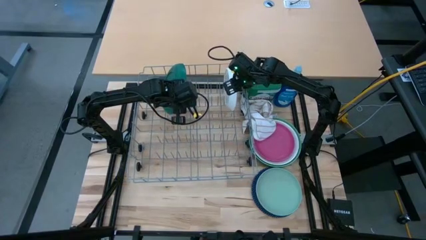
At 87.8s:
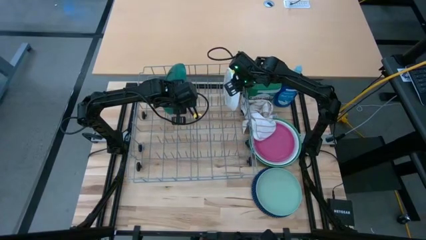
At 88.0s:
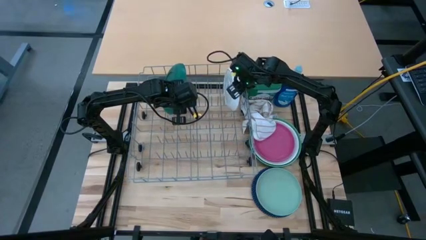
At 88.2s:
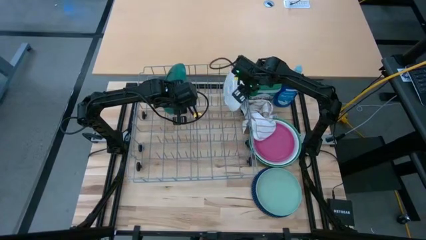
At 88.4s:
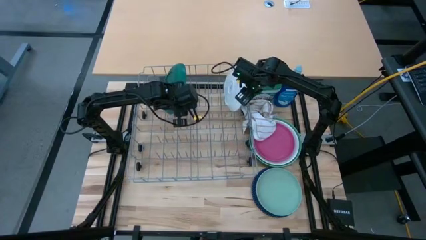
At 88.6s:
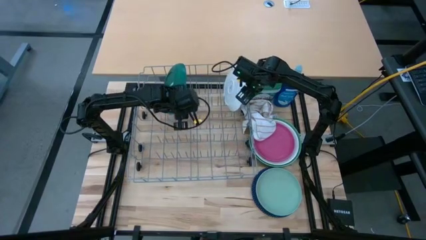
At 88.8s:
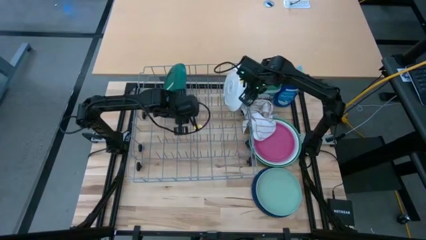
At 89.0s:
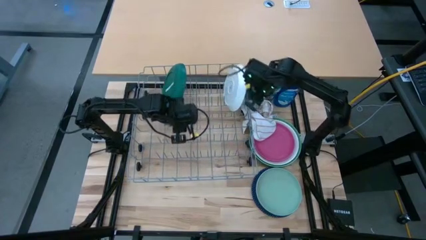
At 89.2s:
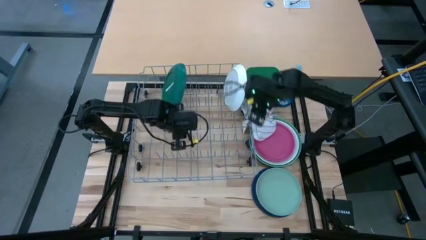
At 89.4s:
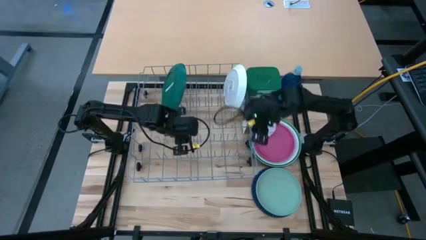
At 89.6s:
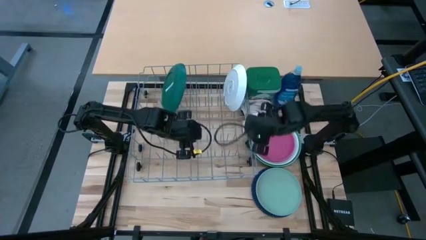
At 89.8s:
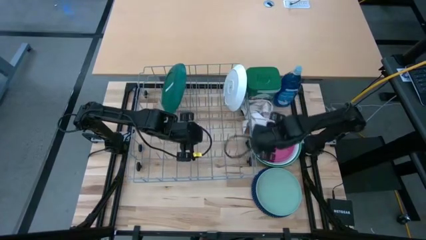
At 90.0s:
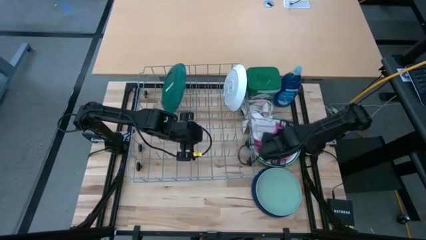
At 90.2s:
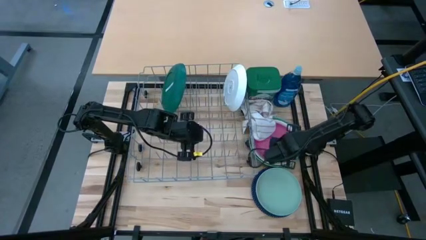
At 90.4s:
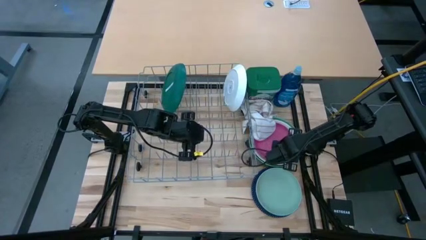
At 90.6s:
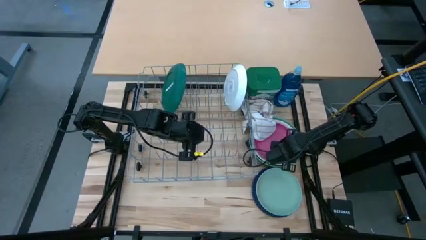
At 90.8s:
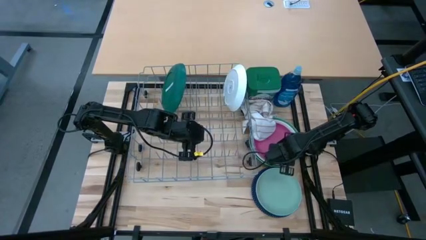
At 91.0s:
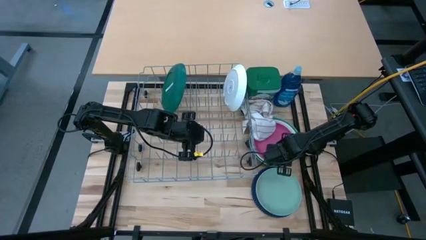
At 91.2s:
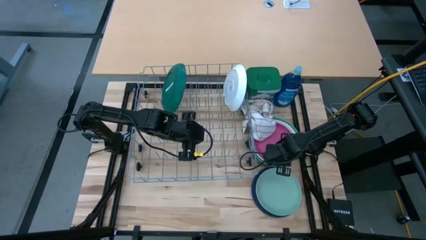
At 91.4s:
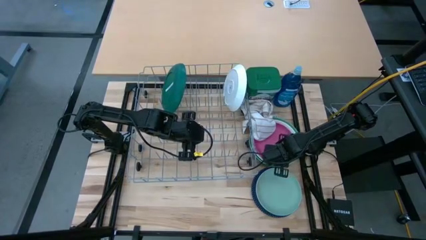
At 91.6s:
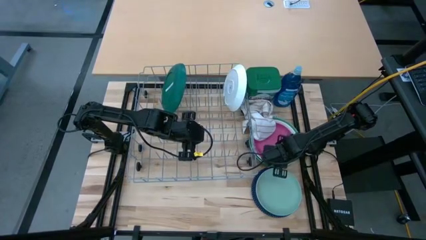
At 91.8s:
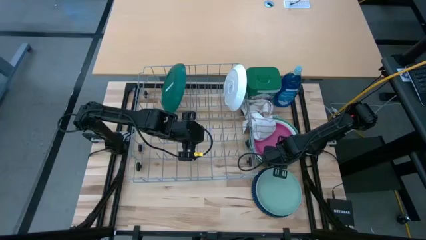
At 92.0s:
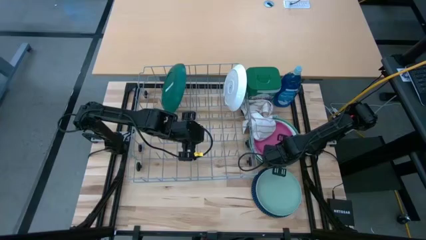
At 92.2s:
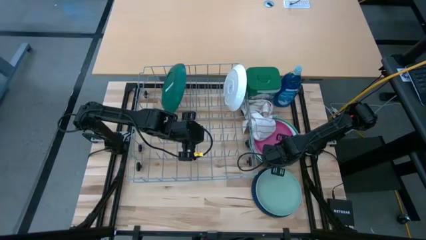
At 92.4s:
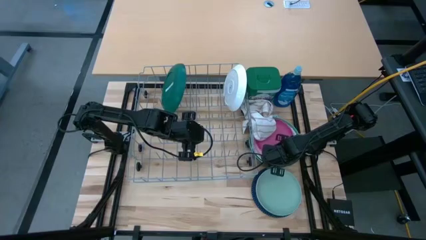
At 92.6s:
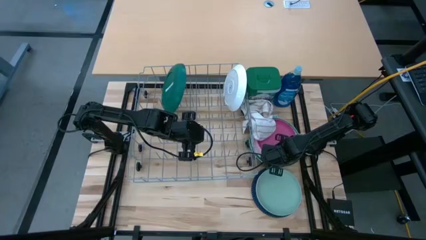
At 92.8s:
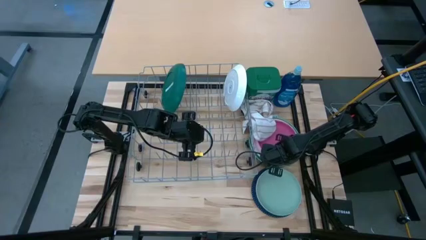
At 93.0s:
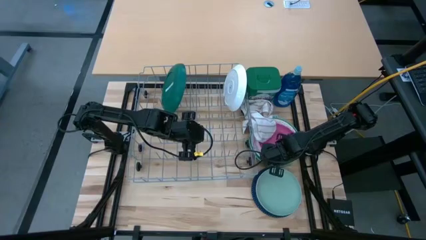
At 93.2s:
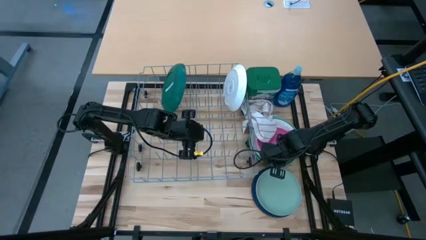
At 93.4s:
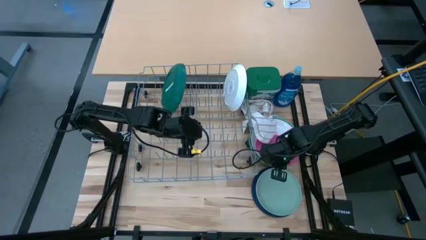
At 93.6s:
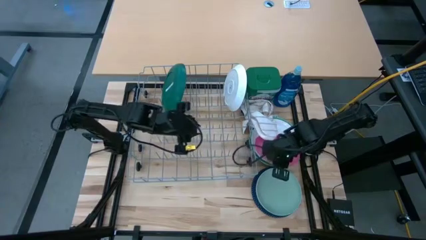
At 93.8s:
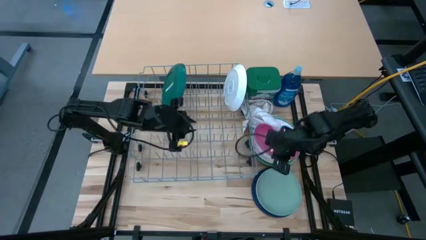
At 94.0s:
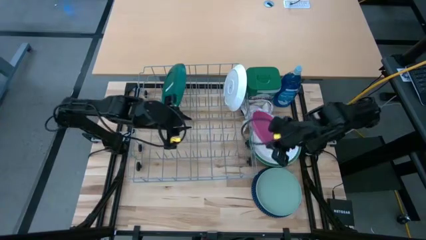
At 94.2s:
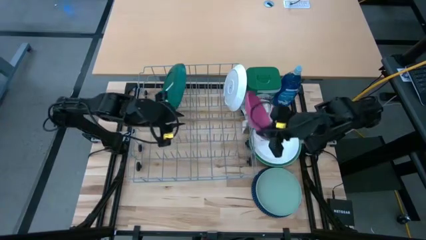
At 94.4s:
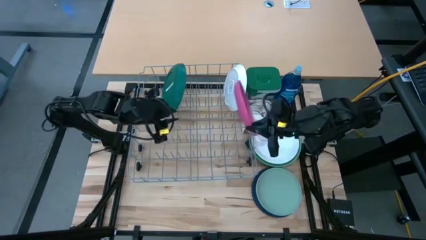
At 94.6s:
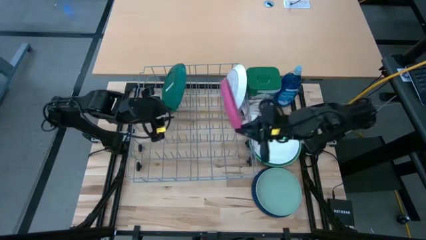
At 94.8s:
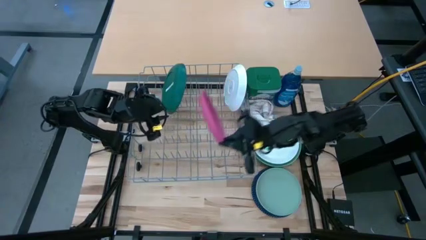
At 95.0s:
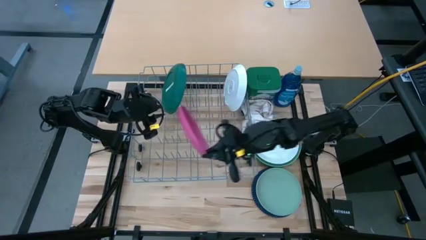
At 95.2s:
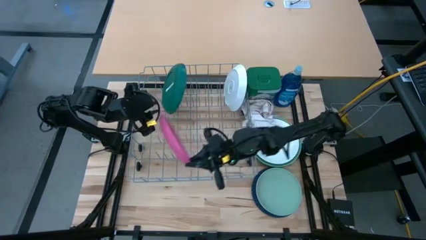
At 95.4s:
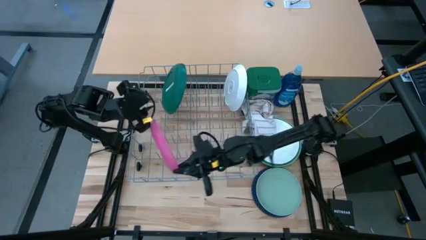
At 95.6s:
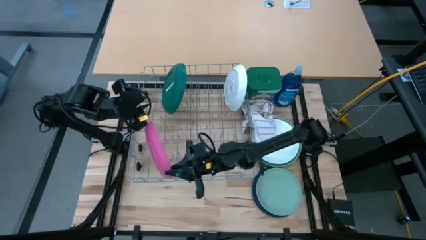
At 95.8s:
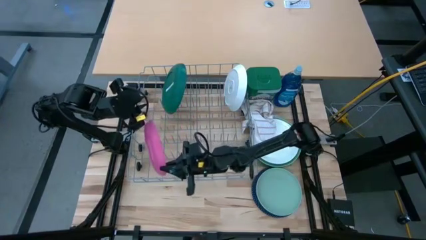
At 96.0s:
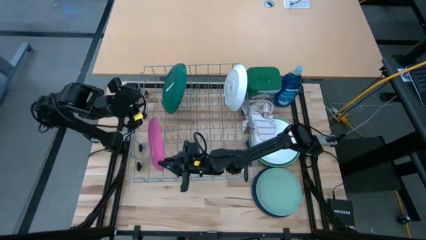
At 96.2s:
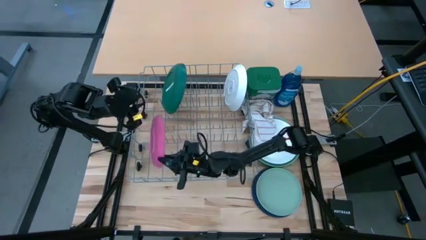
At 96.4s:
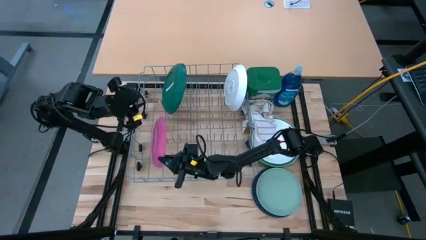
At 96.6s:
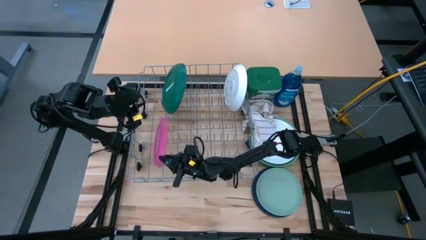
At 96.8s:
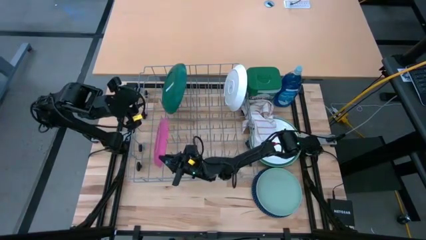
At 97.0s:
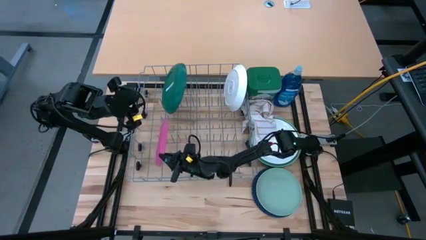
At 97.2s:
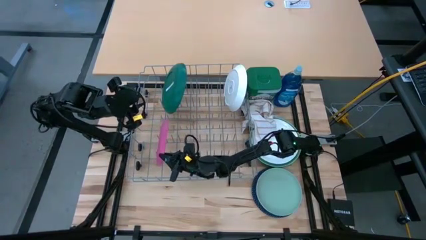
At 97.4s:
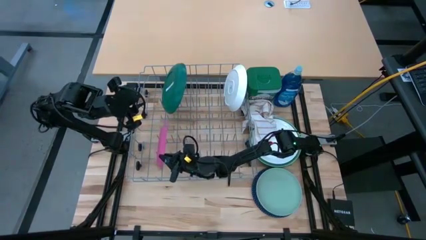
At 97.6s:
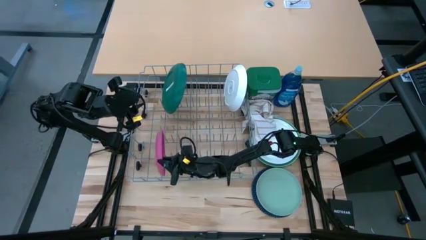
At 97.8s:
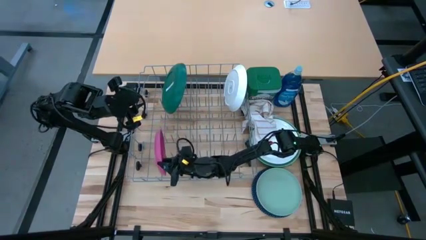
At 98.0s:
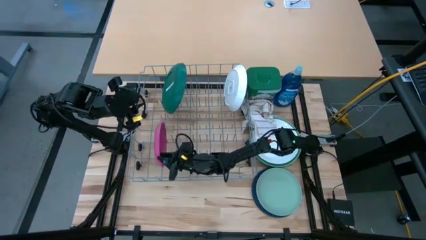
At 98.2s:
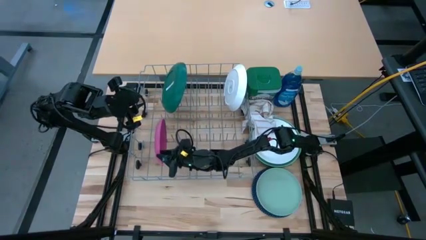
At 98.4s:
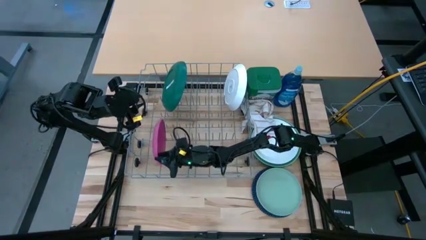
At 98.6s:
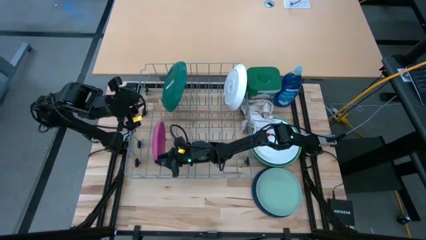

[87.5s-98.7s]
Task: Sort dishes
Put the pink plate in the dish rack
